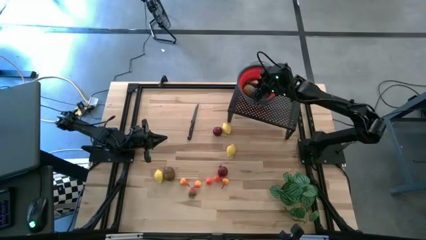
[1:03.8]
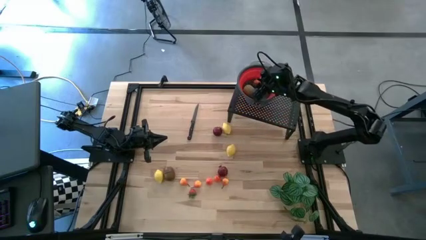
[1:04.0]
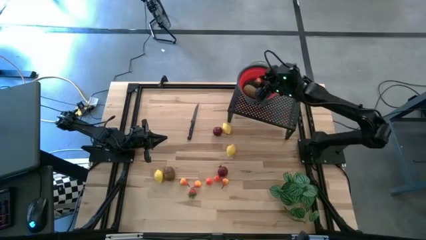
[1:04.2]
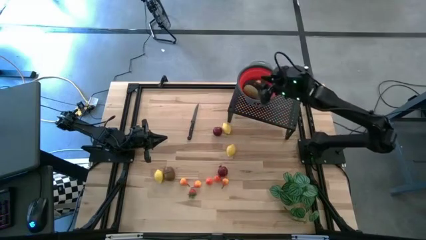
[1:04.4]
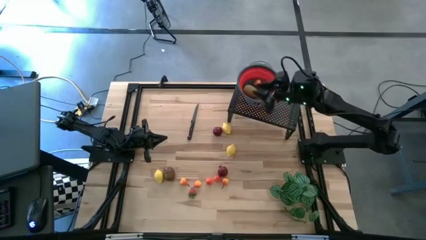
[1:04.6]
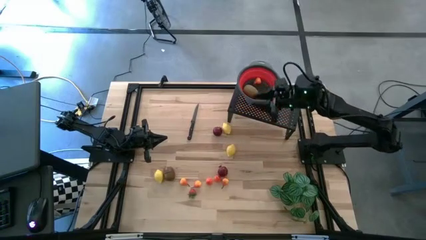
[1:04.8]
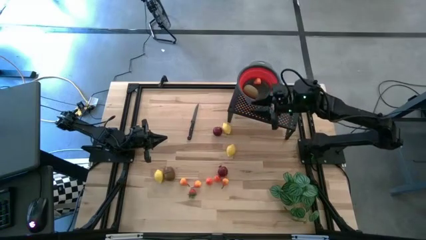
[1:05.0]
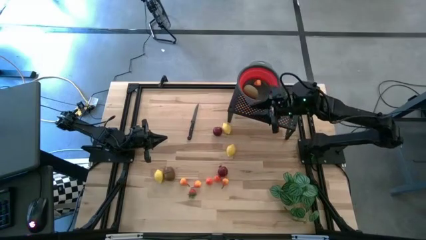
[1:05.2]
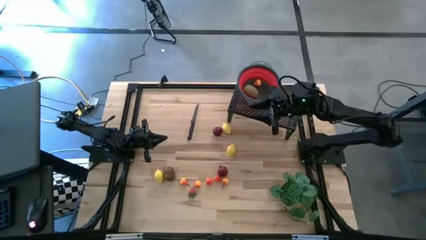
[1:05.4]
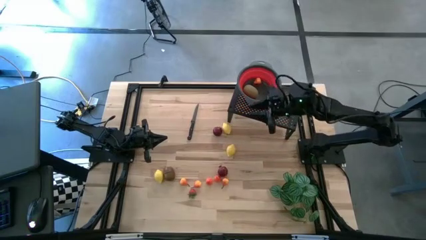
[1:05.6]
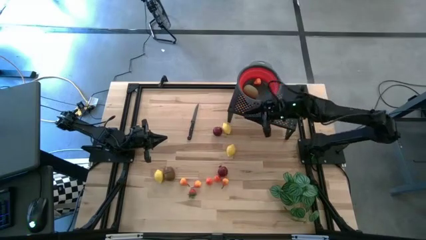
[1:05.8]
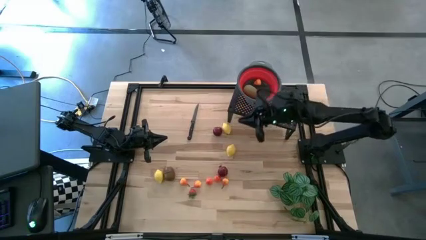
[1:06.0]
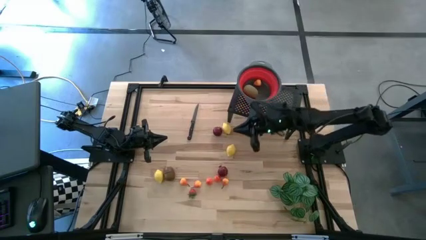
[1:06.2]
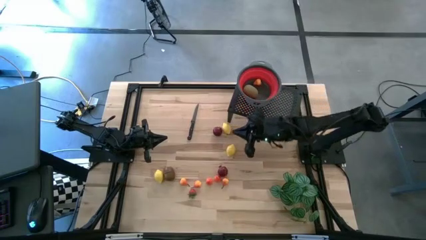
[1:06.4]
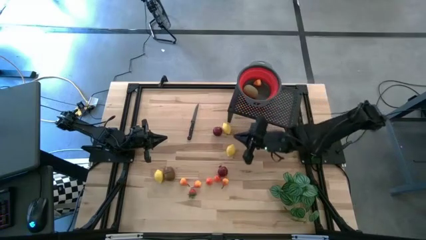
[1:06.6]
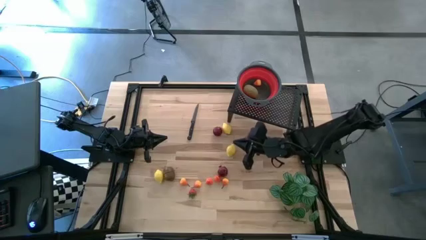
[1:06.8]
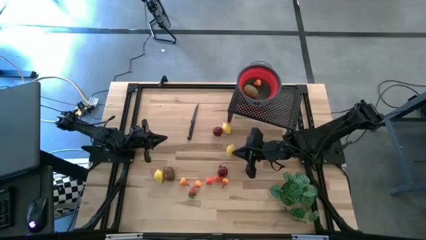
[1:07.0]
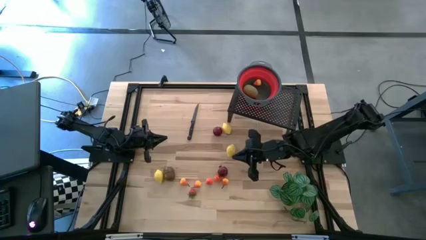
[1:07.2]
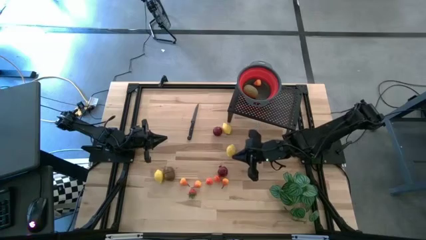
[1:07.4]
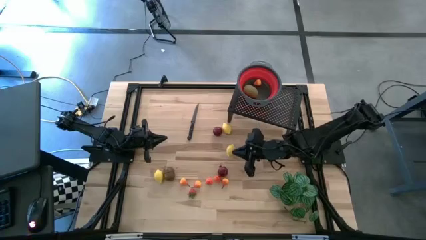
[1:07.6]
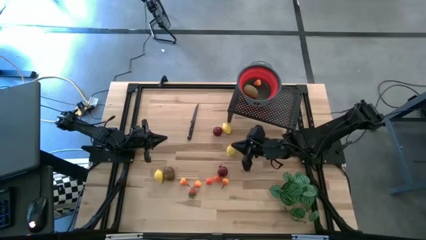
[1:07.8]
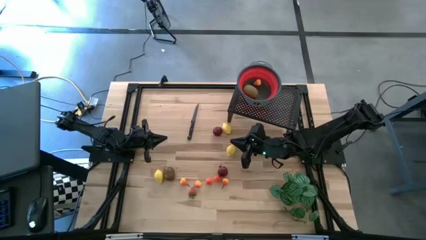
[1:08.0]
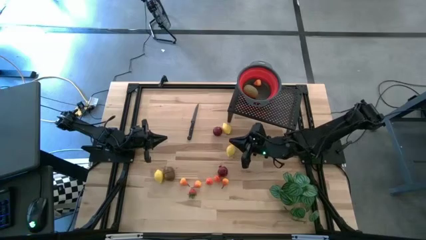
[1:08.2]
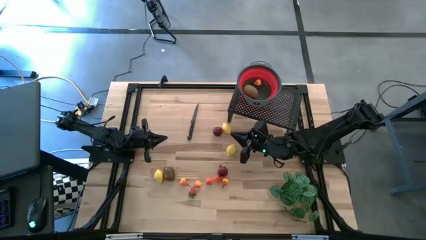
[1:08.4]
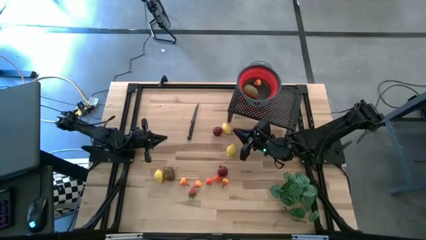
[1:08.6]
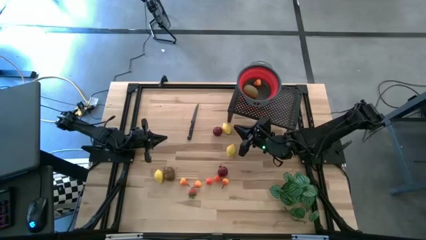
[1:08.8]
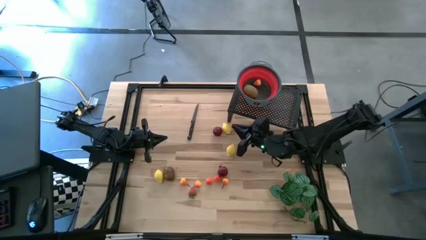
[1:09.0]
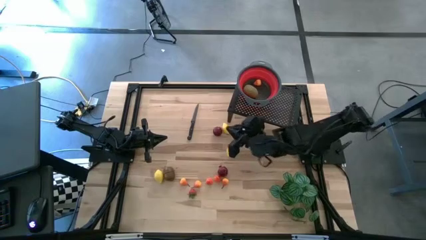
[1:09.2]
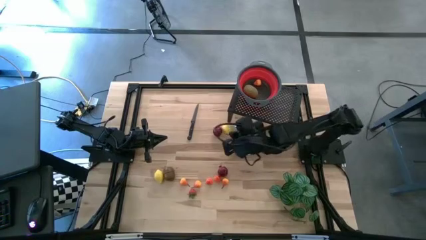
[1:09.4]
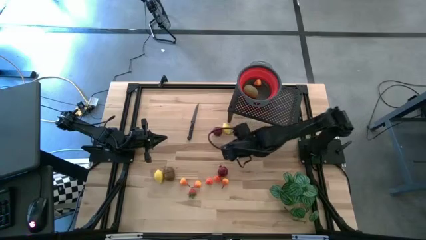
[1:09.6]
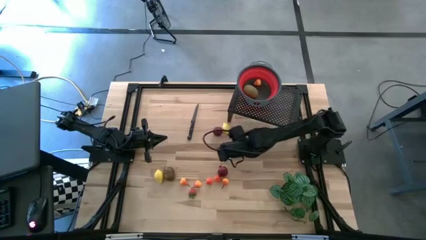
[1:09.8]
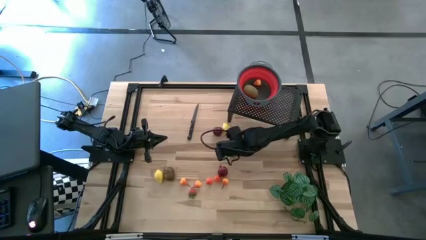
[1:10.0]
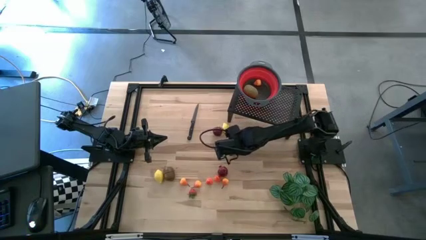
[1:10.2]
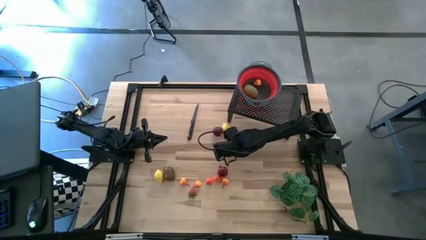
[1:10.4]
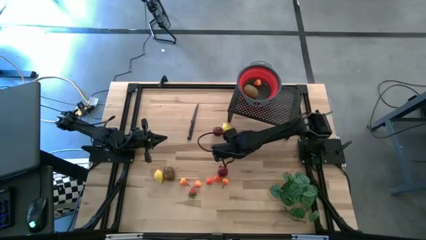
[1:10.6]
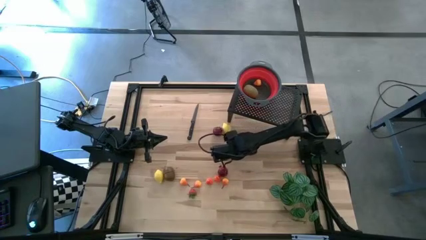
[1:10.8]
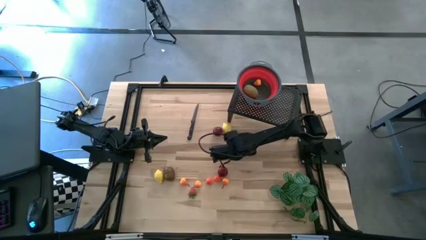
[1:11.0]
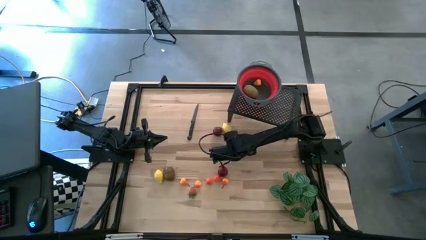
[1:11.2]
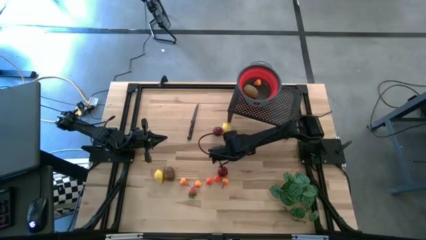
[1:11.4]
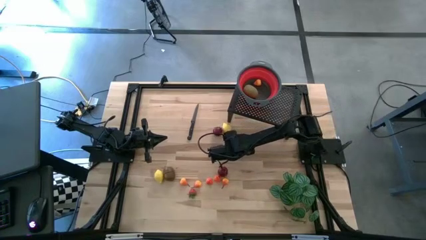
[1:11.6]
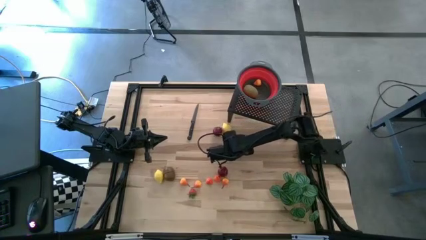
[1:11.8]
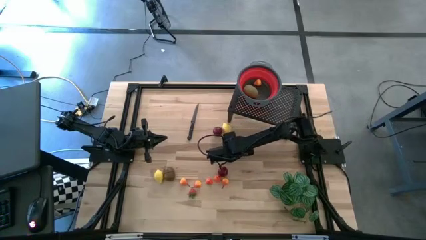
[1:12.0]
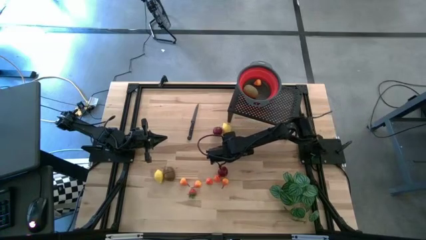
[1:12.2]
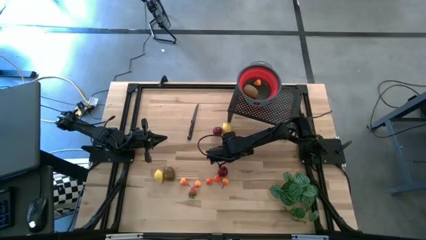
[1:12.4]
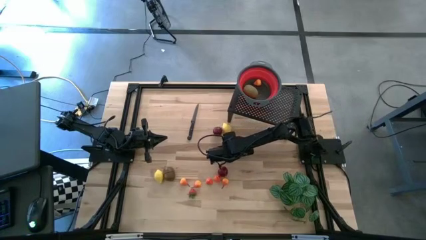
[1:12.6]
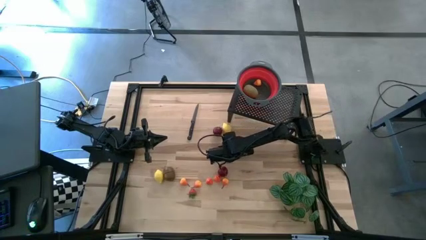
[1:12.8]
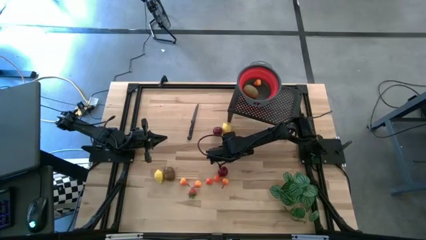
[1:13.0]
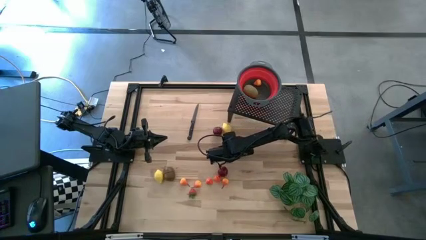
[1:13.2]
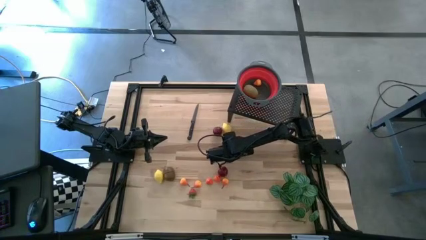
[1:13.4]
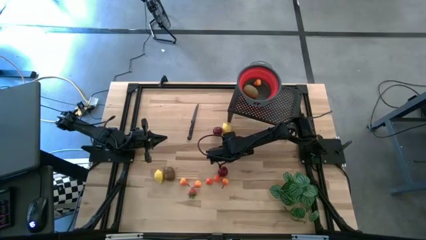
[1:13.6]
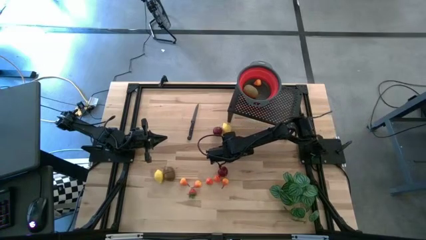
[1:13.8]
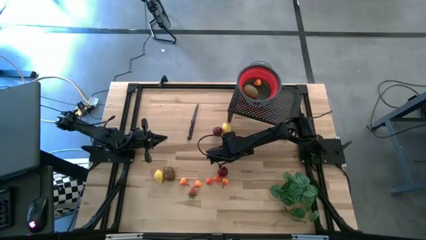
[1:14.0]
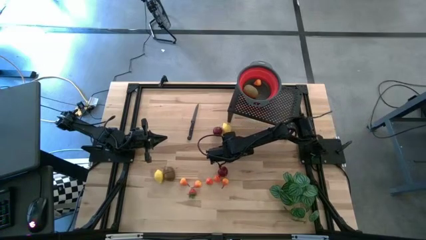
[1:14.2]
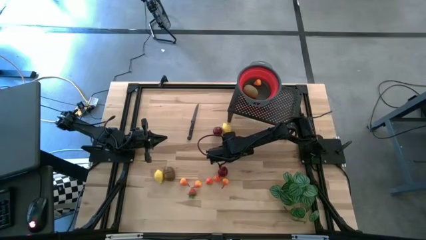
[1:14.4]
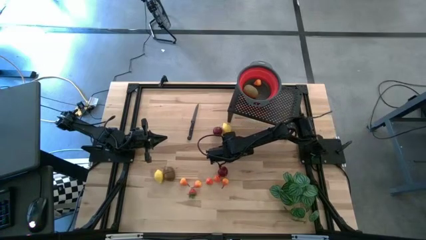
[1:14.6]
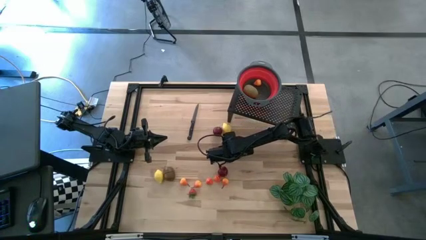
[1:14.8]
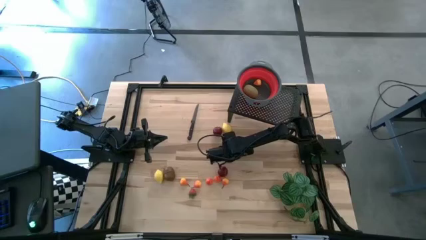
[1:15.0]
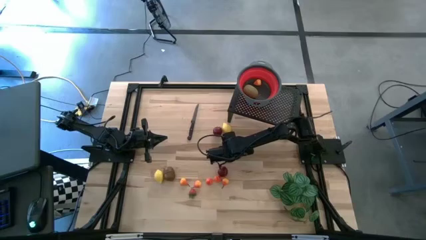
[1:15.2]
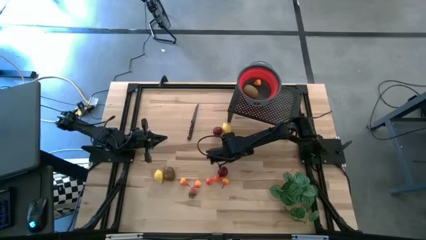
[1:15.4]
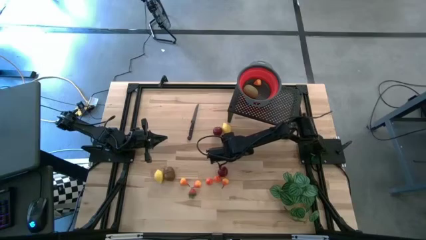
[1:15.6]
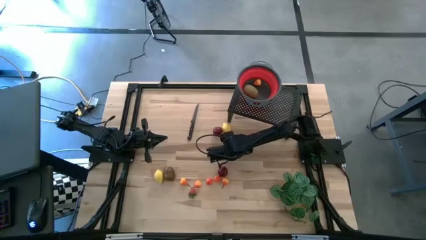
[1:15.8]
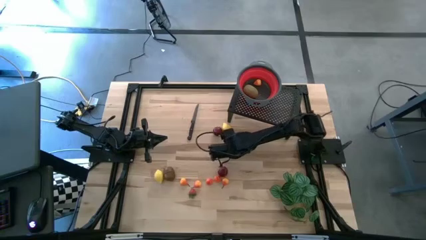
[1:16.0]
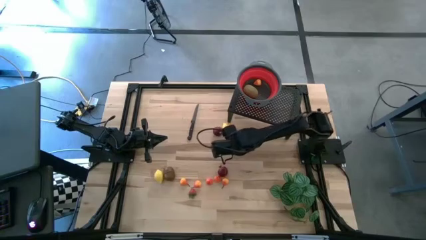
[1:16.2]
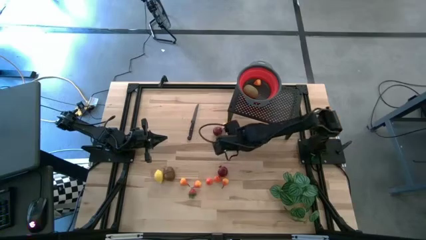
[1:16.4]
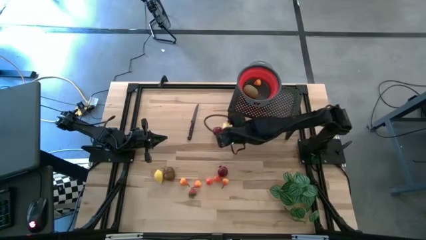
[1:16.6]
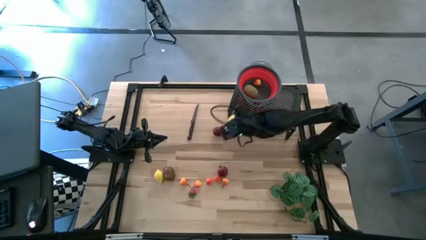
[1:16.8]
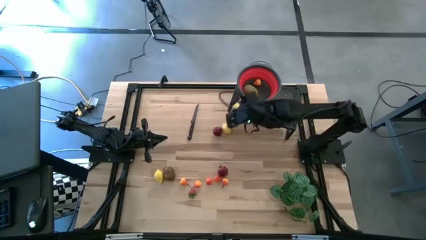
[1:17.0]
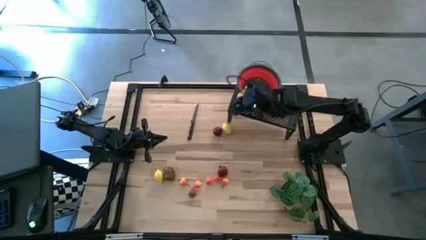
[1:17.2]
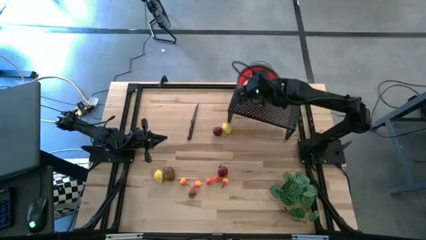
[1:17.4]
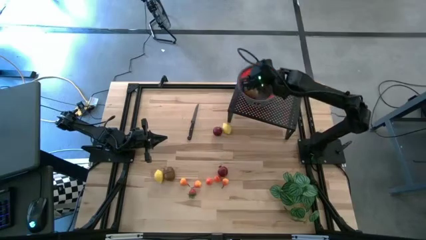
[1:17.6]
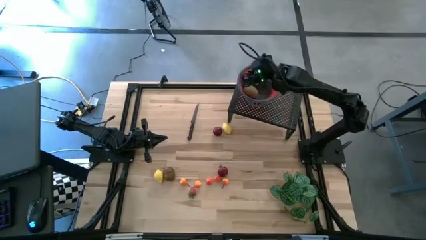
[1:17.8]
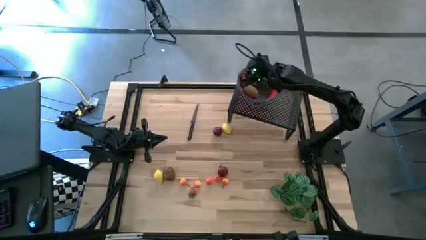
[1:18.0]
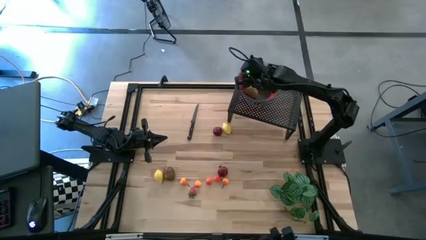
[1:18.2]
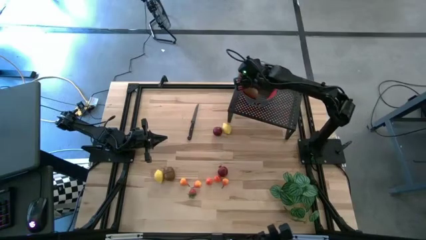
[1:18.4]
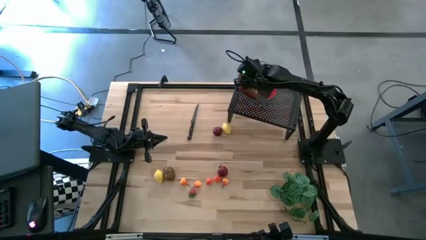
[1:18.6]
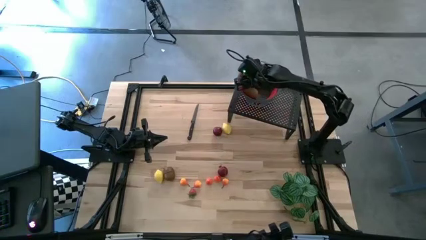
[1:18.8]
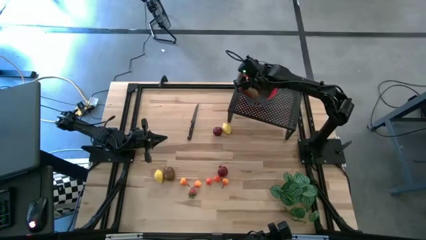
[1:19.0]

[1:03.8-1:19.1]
Task: Pick & Place Fruit
Put the yellow lemon into the red strainer bowl on the shelf

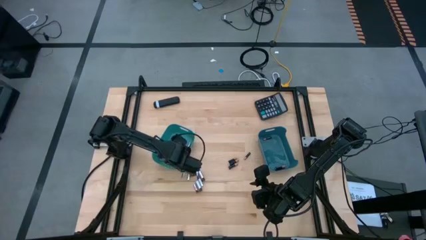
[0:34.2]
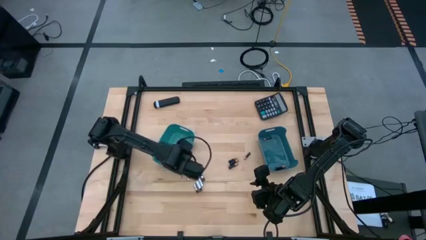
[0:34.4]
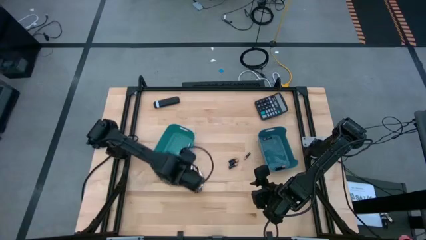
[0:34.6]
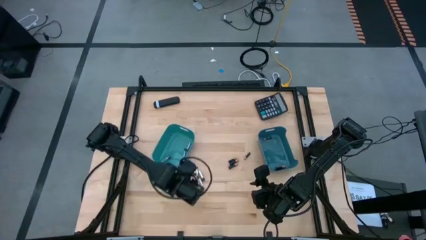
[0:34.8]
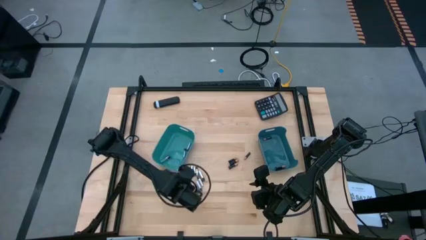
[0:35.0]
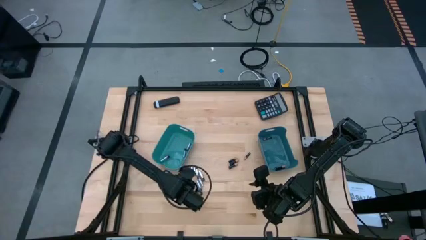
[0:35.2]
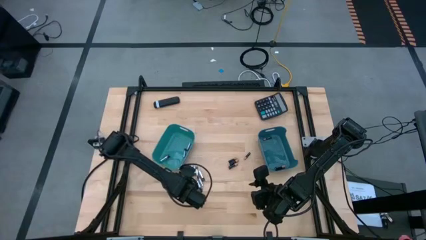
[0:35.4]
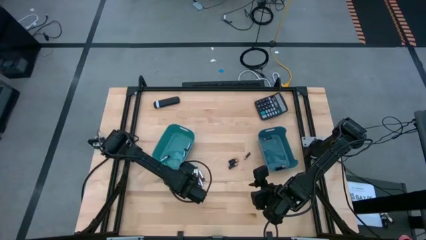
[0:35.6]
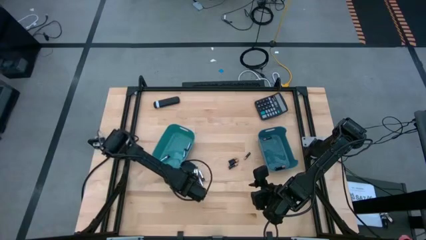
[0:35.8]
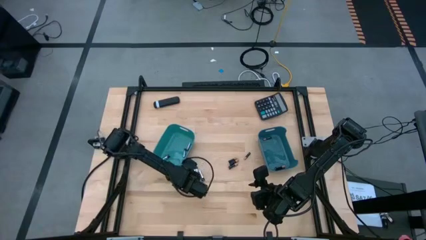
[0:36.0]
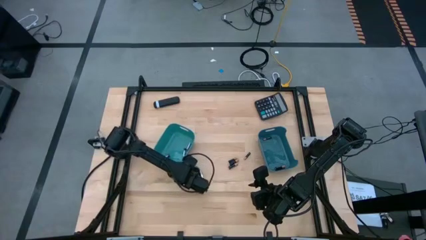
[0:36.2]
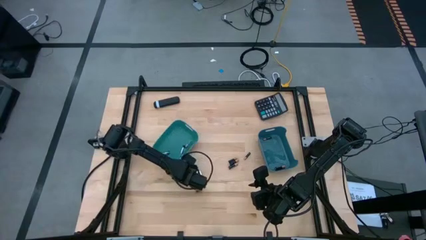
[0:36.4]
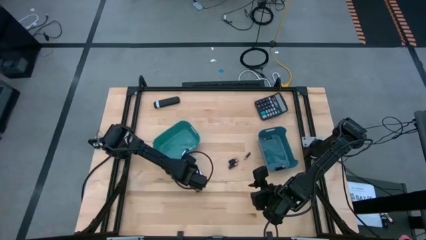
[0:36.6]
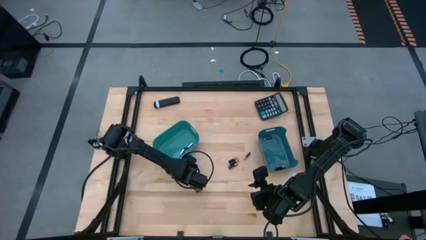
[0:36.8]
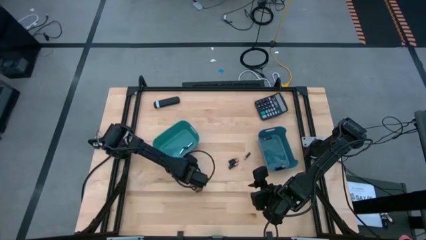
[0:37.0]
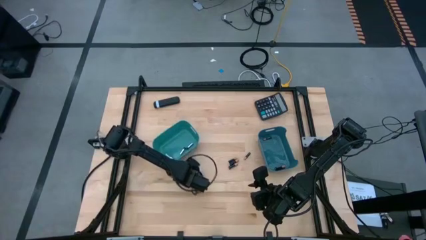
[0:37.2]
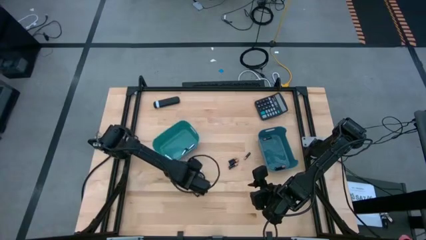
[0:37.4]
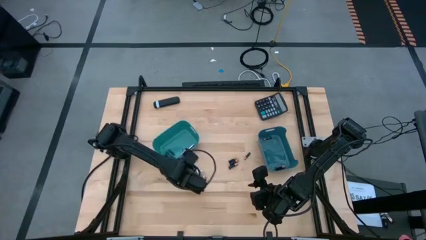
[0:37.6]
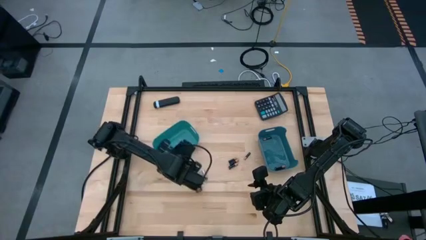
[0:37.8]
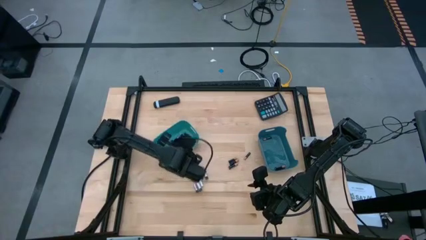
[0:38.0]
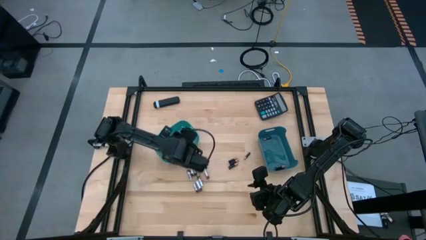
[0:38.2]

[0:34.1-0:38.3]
Task: Sort batteries
Put the white battery into the green bin
